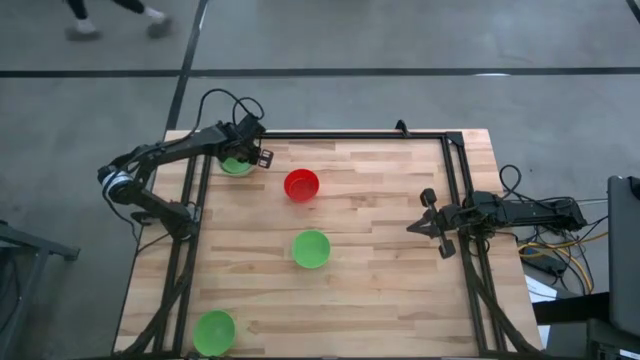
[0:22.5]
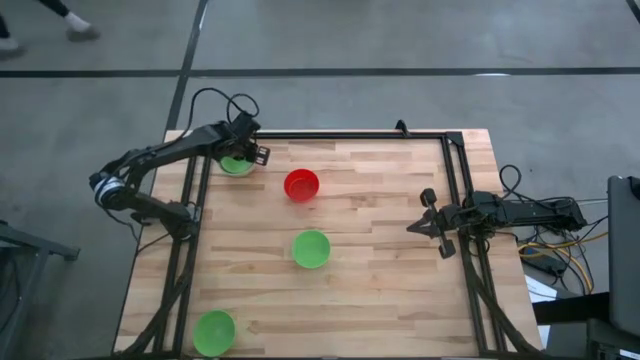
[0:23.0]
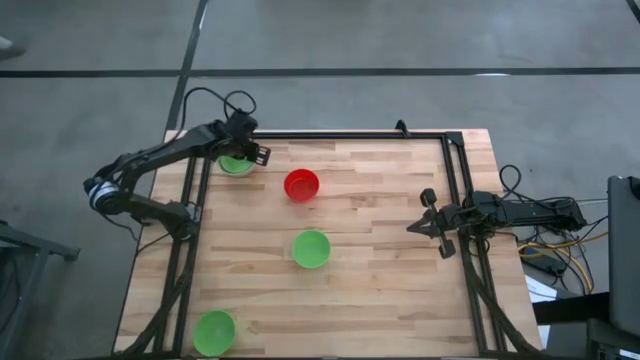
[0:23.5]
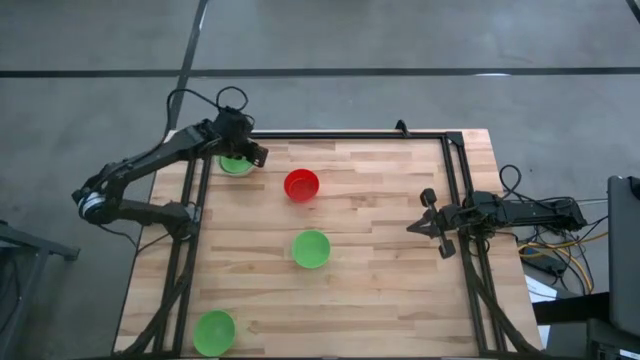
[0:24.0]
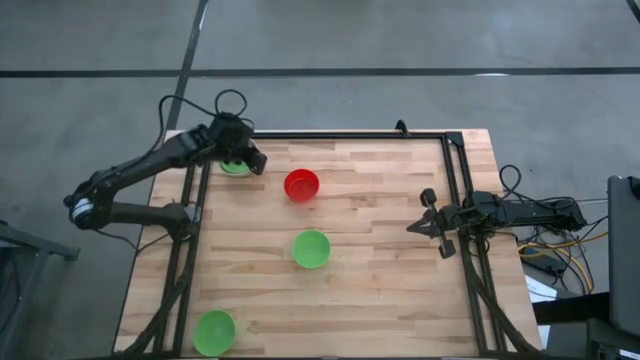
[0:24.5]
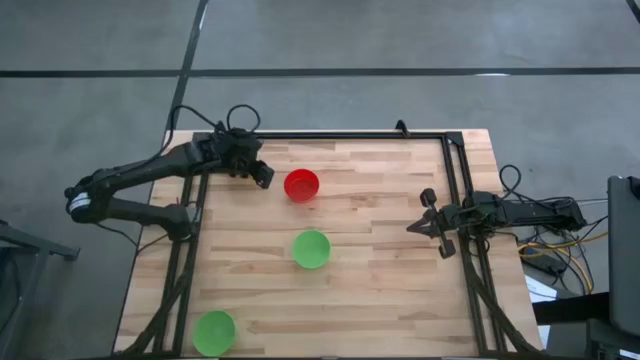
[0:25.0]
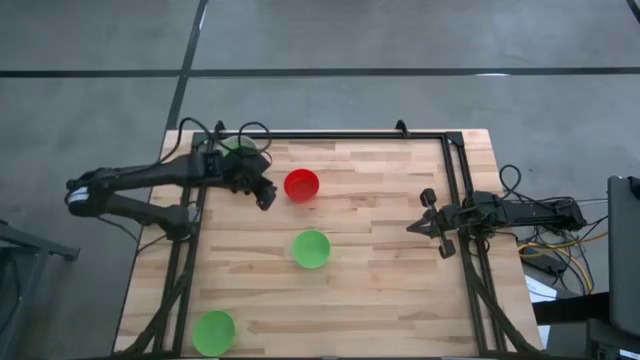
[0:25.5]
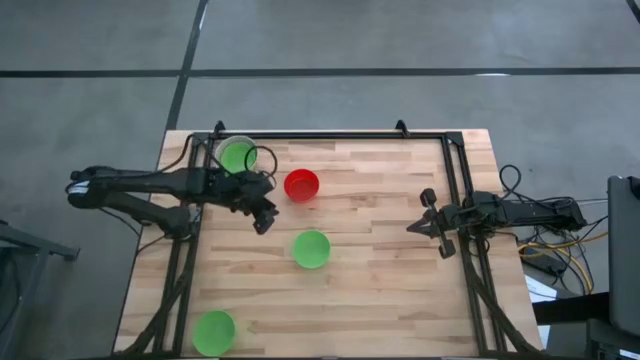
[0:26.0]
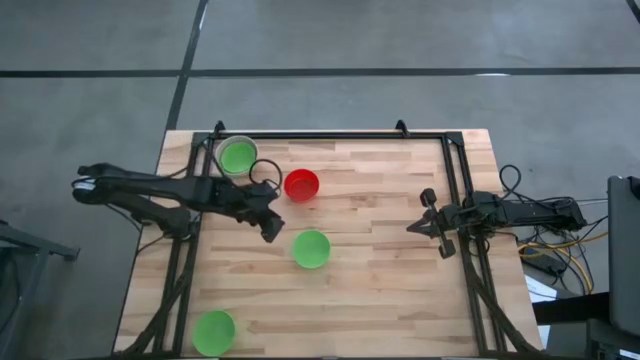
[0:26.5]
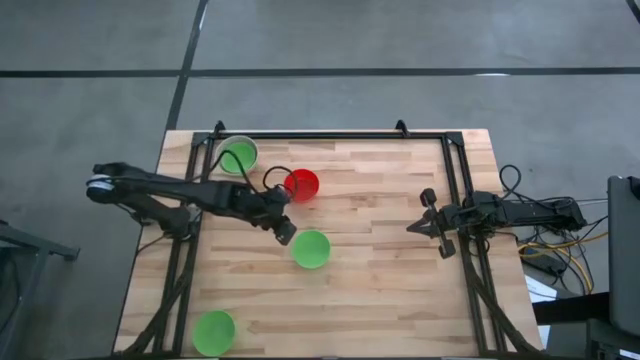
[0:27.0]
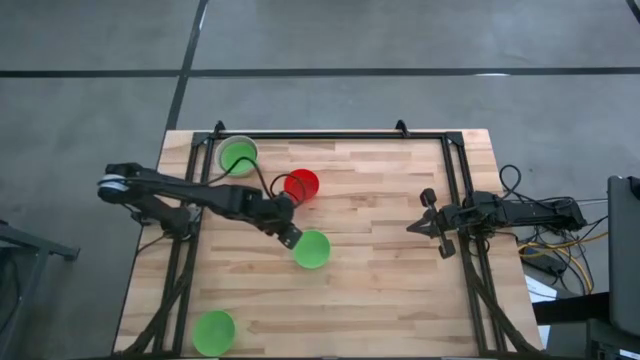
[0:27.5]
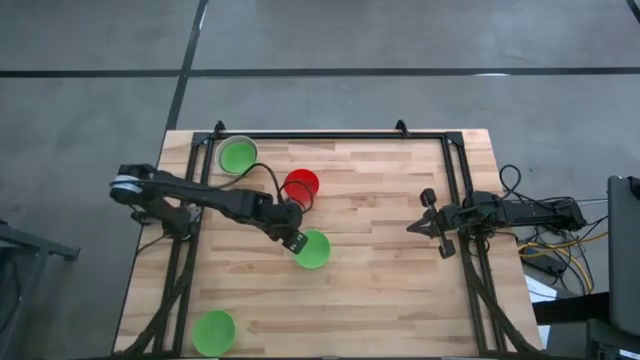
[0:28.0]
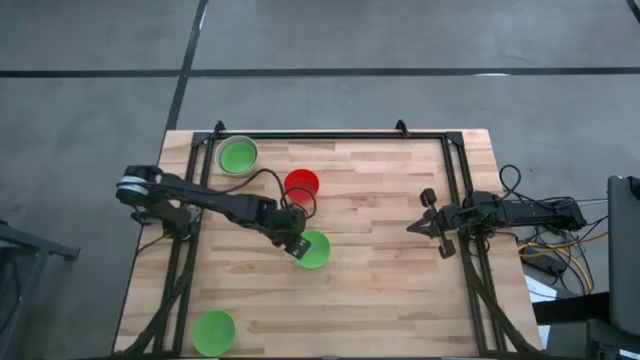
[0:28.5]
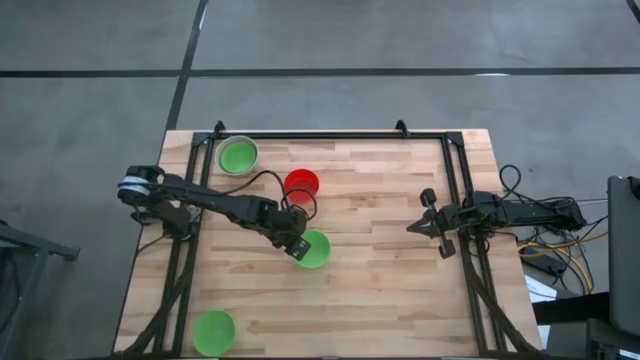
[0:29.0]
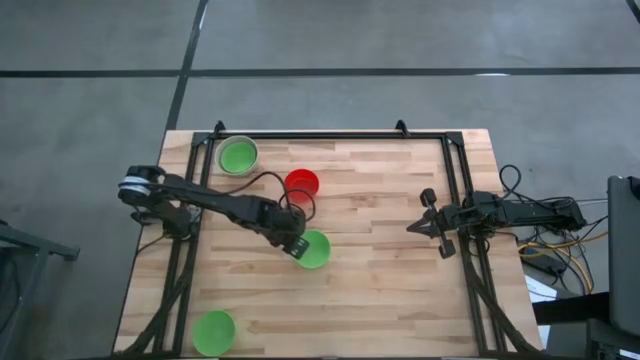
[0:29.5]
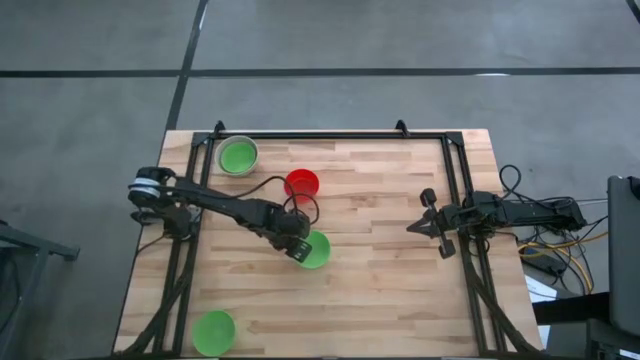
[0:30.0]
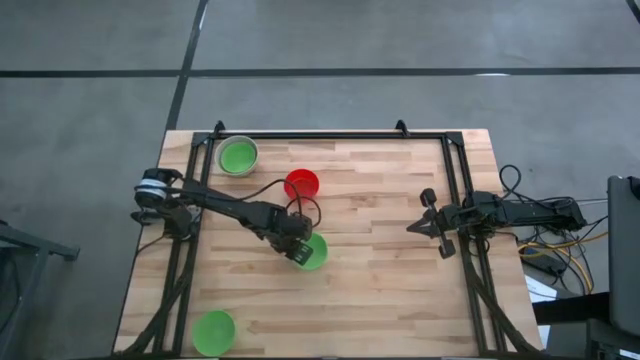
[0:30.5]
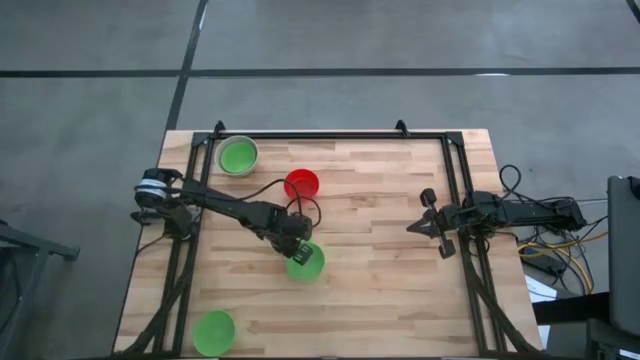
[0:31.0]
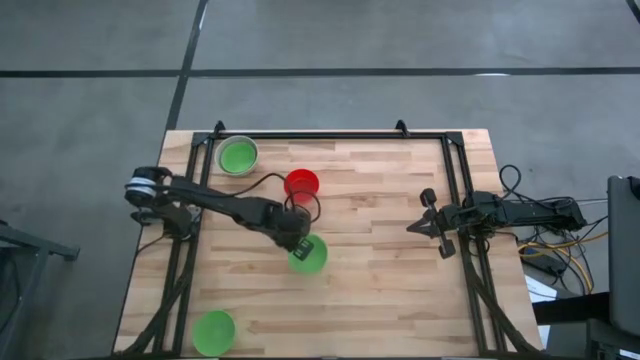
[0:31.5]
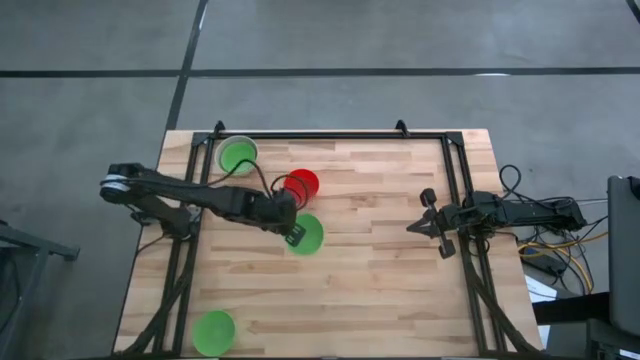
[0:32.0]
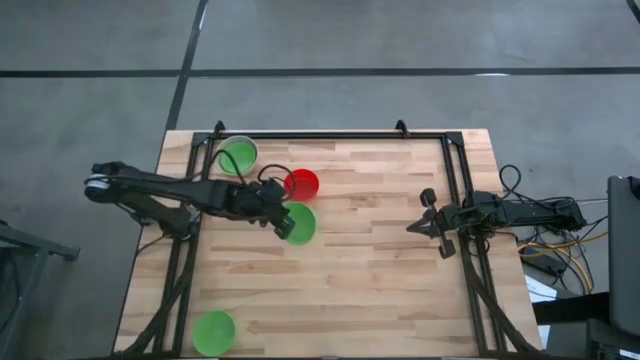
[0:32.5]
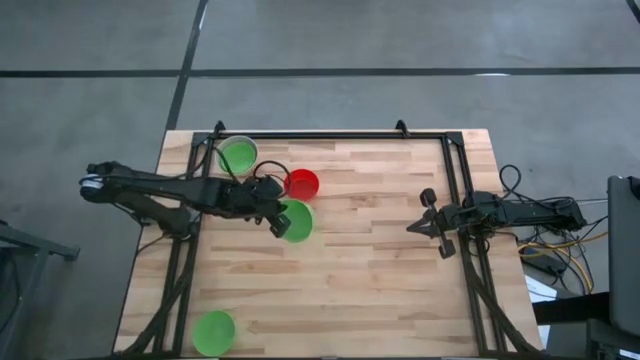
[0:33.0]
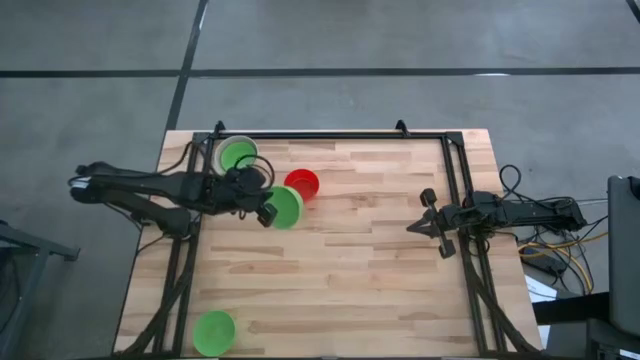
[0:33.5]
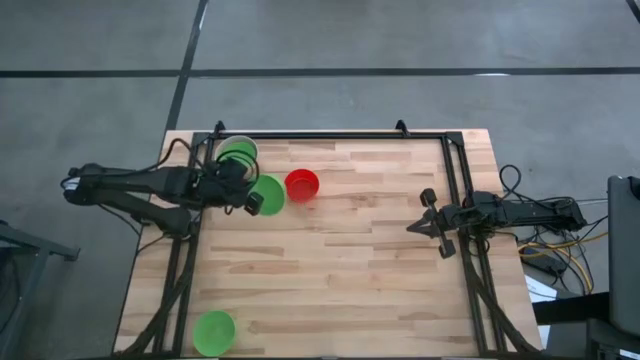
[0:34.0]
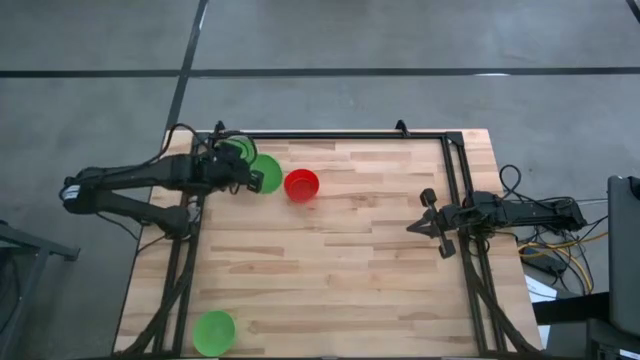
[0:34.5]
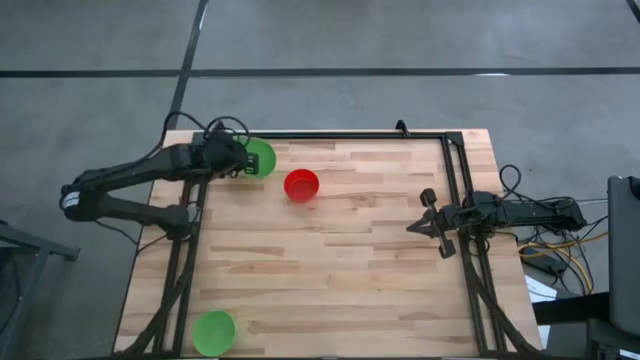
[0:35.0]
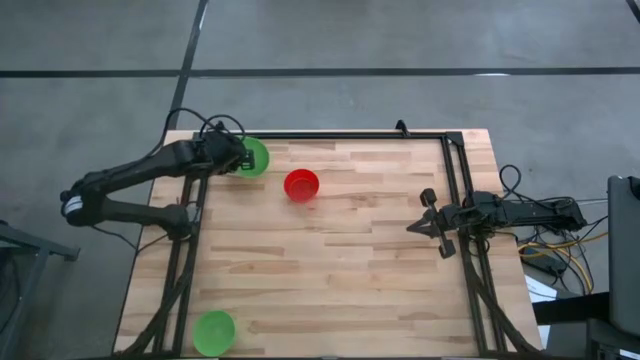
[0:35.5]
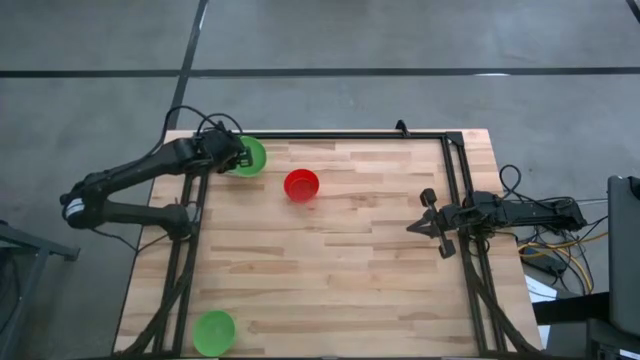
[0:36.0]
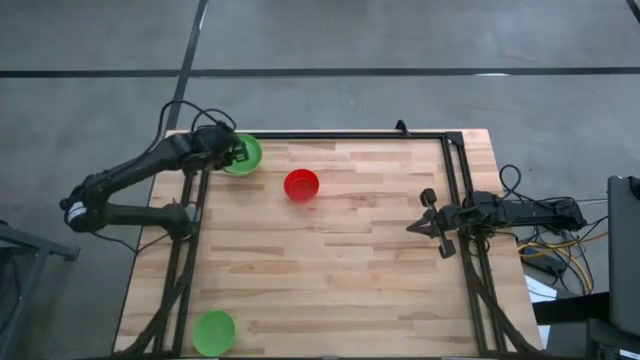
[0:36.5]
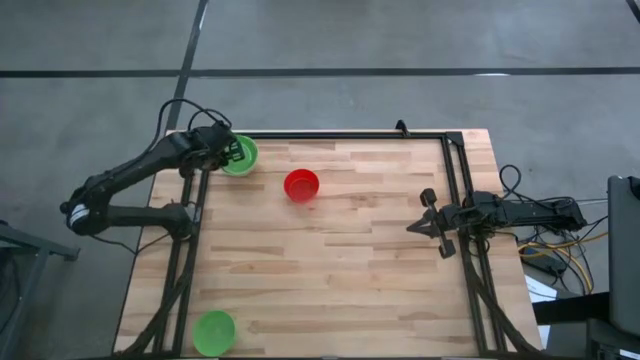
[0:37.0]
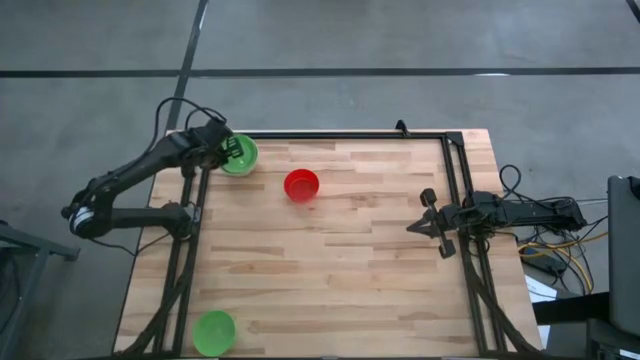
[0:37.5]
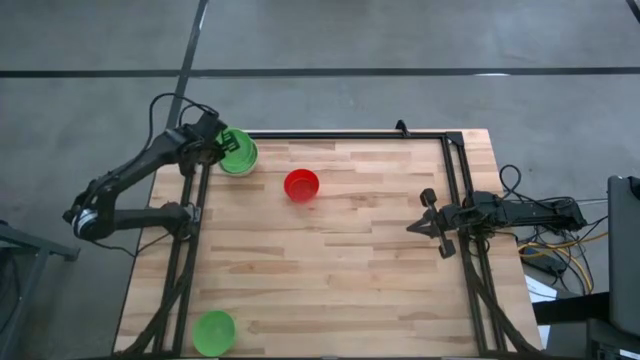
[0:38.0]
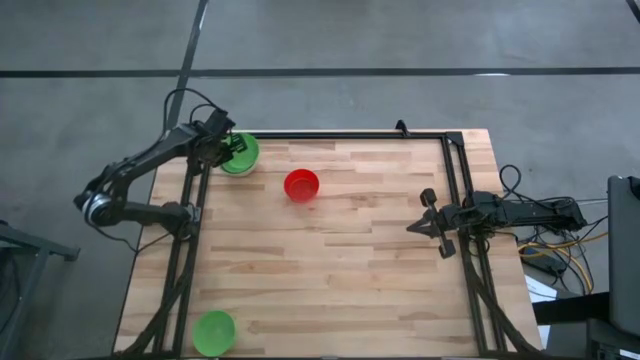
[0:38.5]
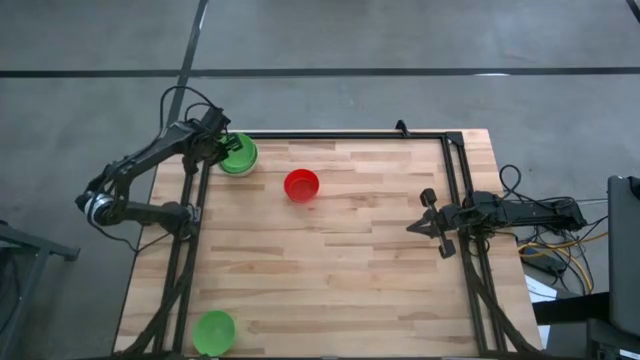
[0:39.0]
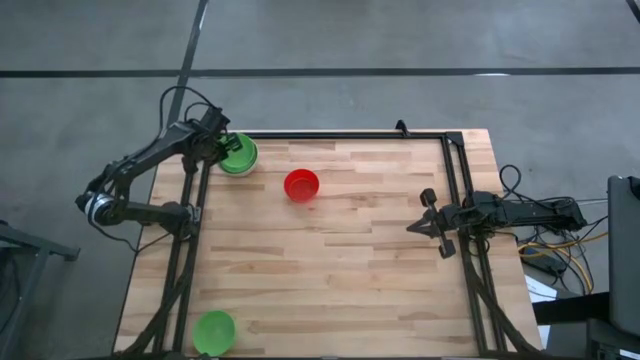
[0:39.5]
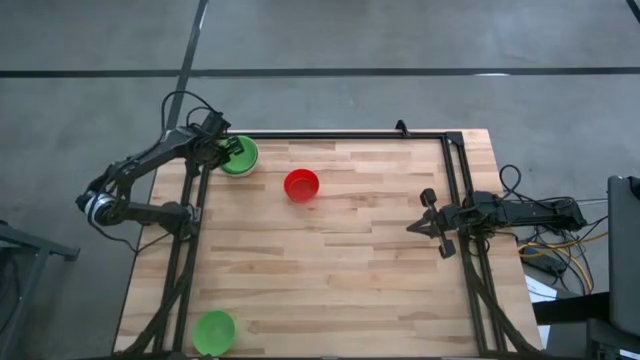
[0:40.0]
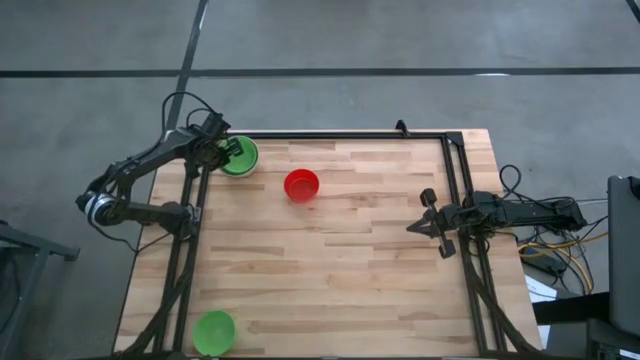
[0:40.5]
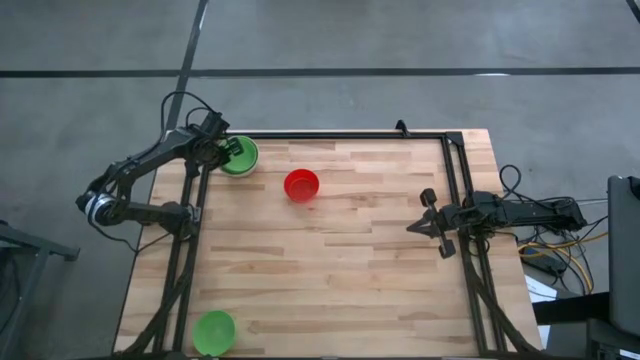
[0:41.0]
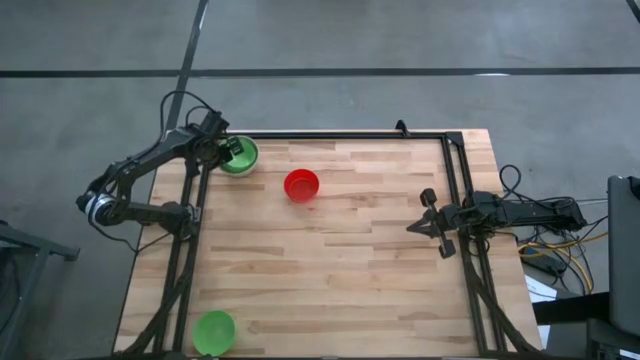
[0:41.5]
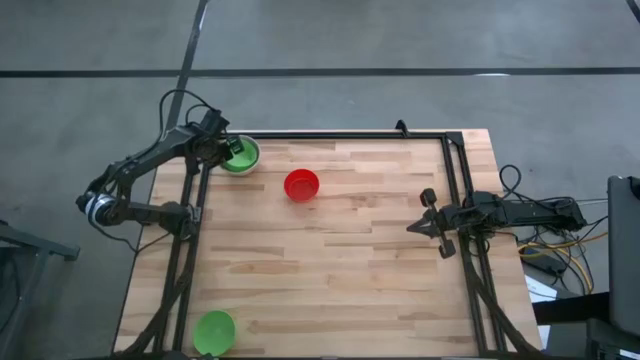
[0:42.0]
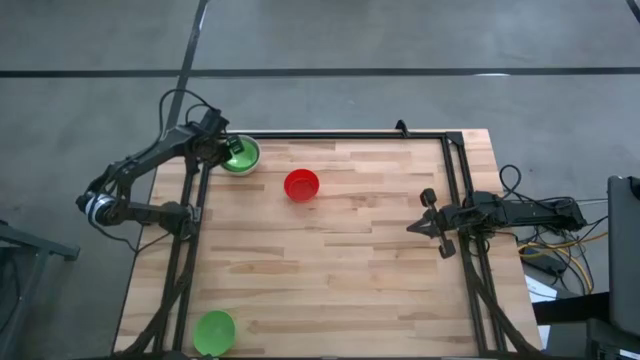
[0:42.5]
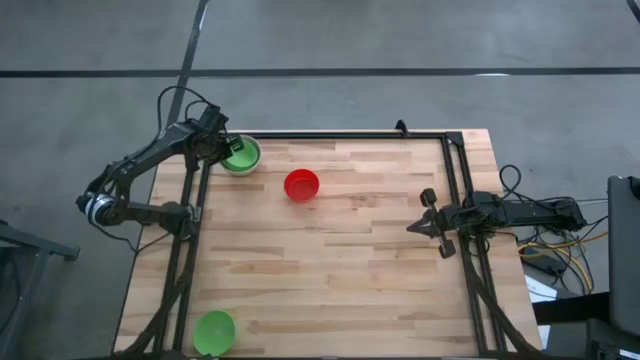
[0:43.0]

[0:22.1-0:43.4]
Stack the right green bowl on the stacked bowls
